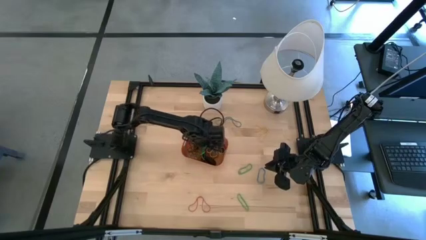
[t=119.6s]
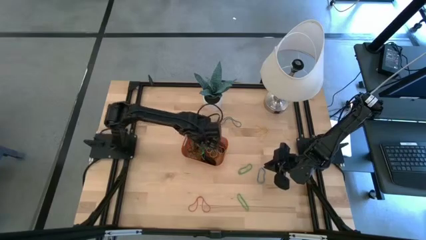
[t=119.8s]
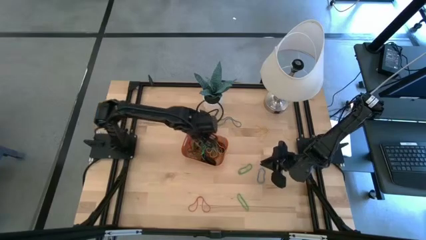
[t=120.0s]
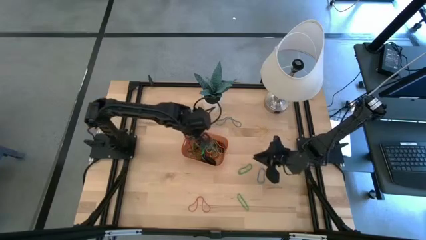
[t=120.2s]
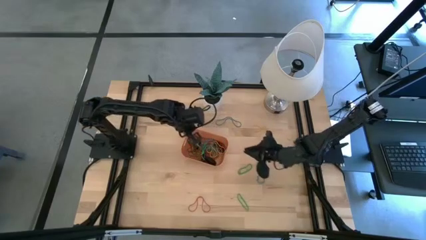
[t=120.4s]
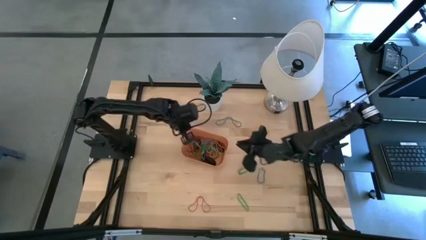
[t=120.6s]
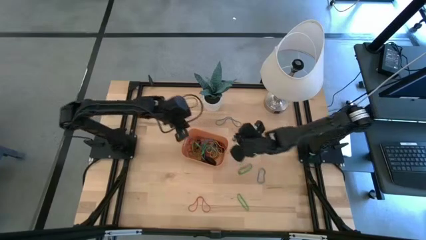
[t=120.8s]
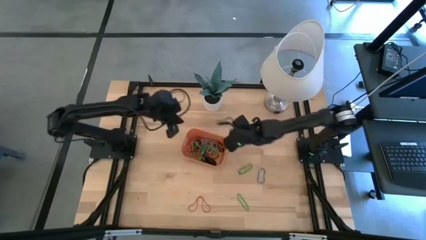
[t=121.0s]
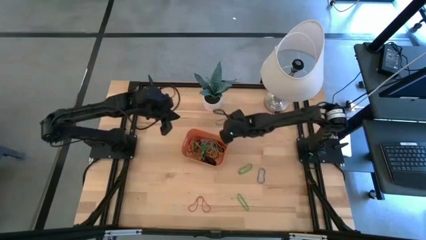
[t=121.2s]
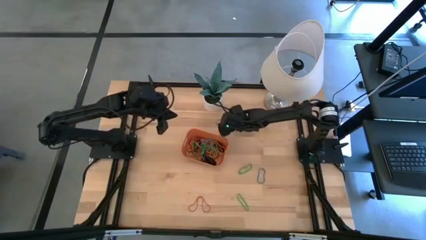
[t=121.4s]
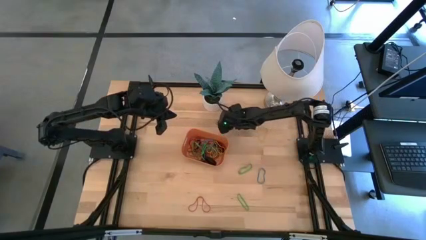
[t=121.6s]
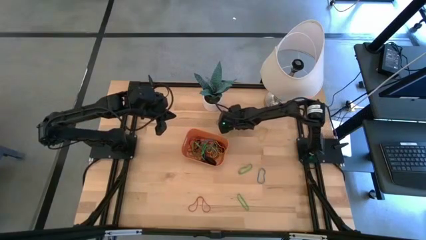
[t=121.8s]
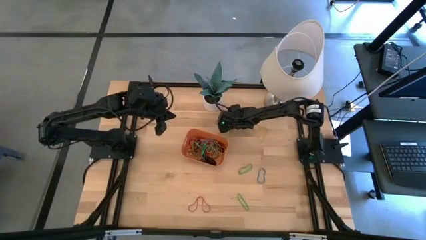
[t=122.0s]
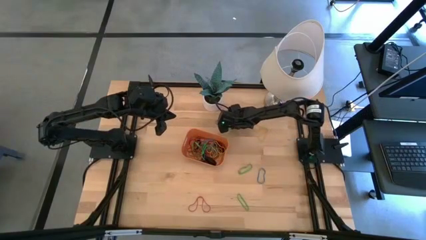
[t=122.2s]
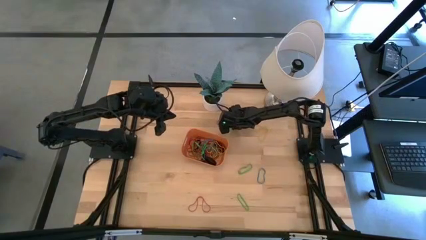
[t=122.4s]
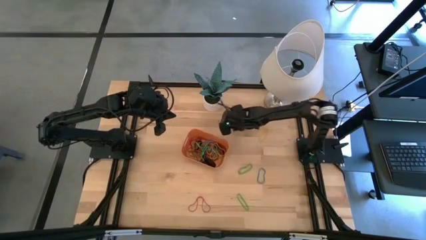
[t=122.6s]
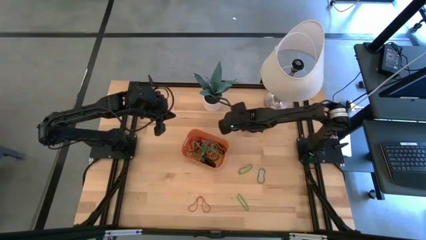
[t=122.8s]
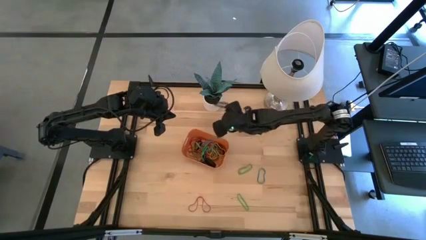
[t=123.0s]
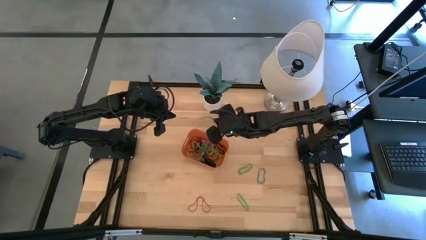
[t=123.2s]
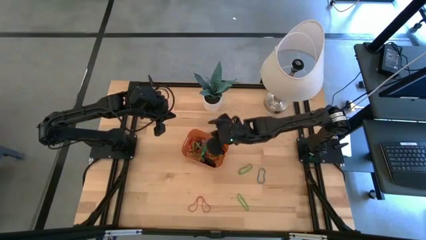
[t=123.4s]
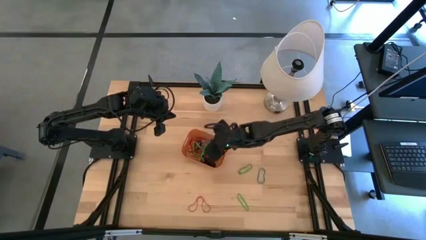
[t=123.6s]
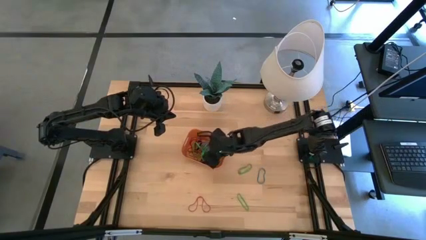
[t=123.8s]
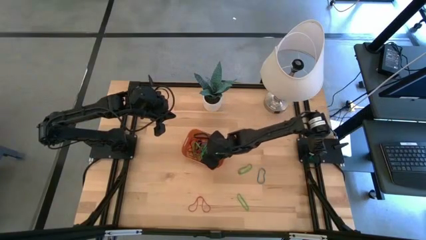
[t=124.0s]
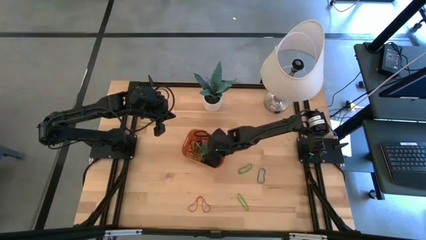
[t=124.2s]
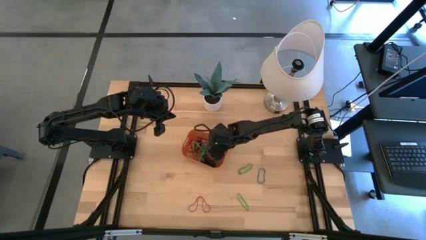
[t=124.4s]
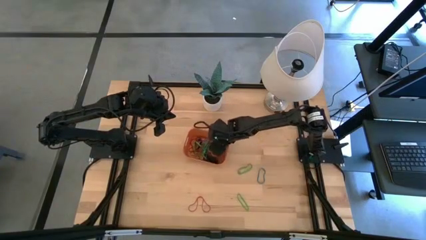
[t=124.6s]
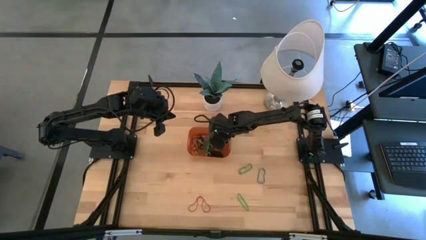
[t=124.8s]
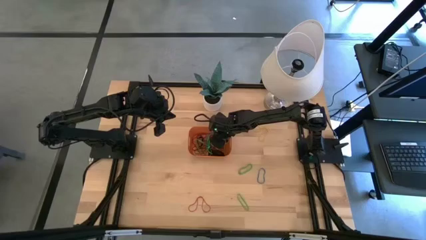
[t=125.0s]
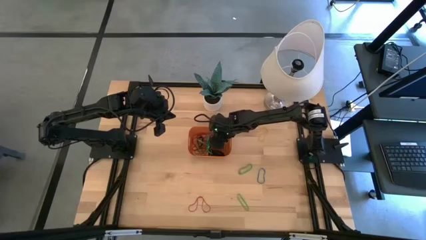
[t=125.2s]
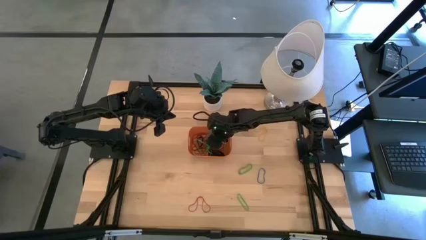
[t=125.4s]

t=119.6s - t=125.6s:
Task: Pick and place rubber bands into bin
Put the blue rubber band into the orange bin

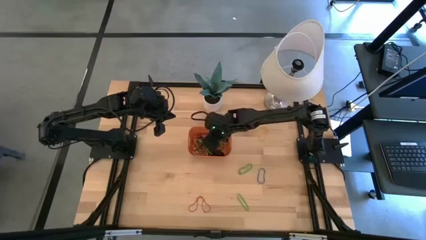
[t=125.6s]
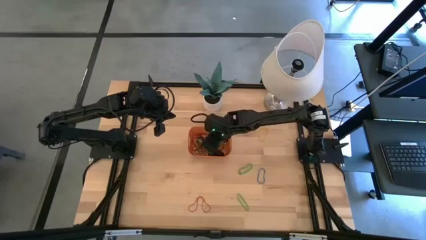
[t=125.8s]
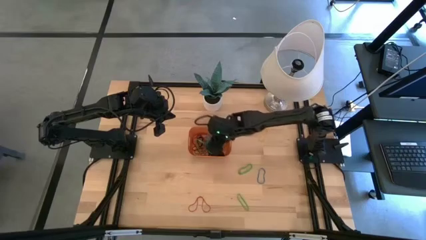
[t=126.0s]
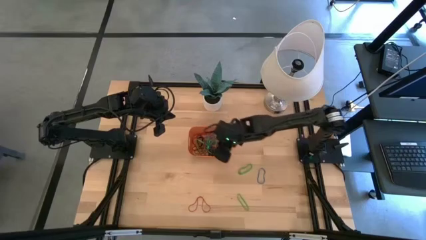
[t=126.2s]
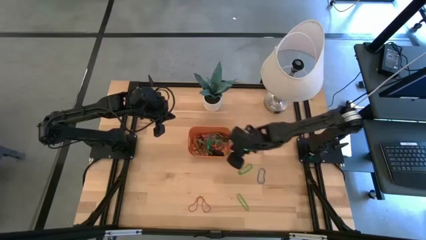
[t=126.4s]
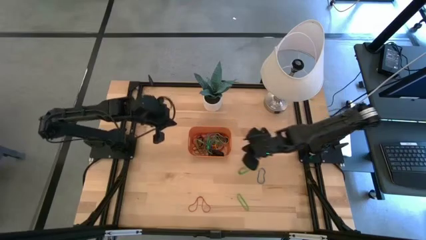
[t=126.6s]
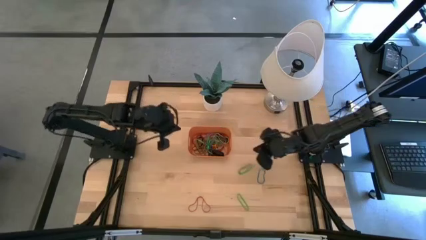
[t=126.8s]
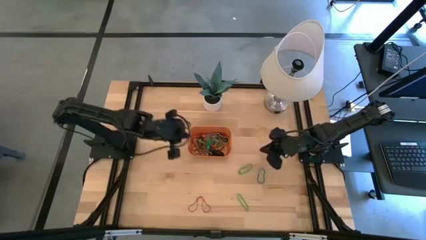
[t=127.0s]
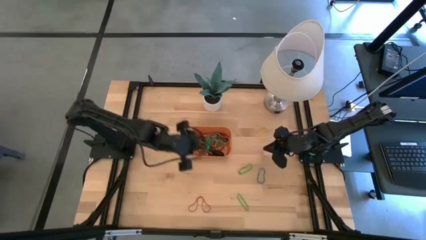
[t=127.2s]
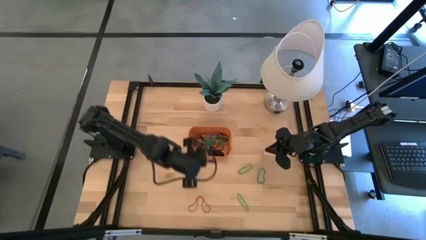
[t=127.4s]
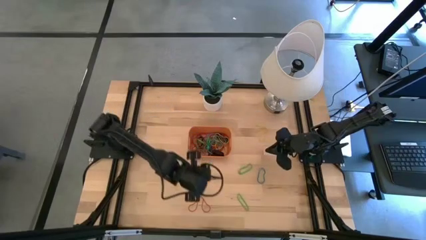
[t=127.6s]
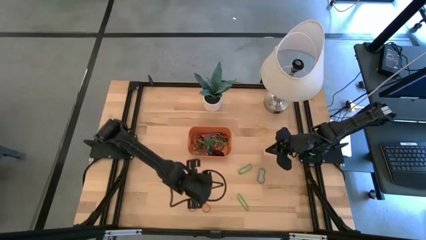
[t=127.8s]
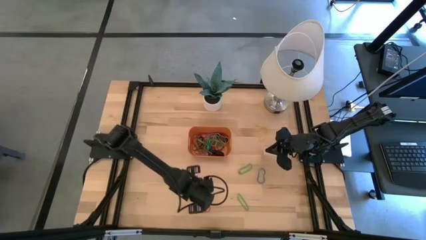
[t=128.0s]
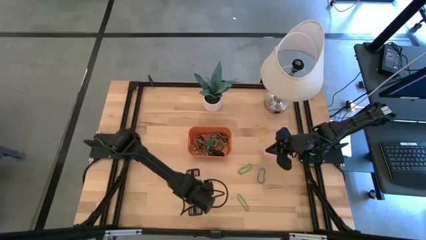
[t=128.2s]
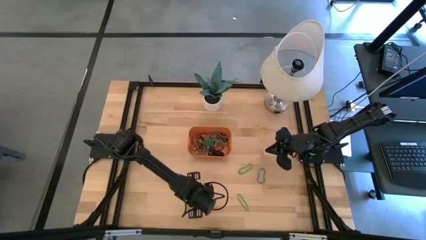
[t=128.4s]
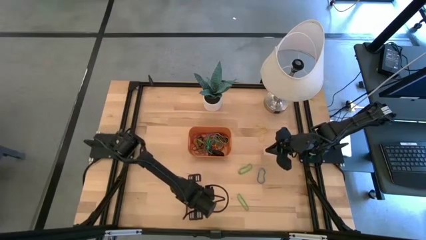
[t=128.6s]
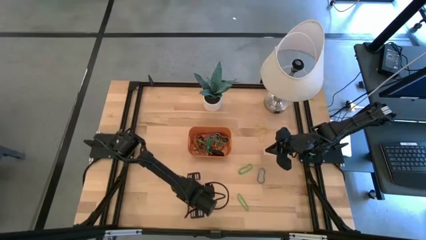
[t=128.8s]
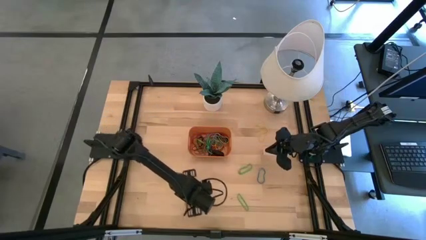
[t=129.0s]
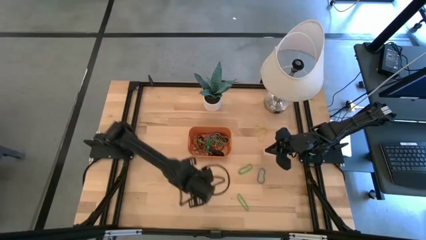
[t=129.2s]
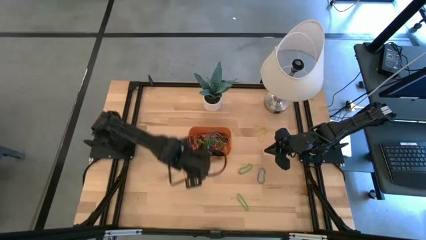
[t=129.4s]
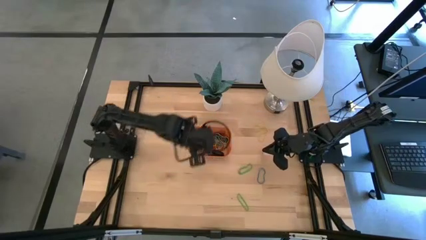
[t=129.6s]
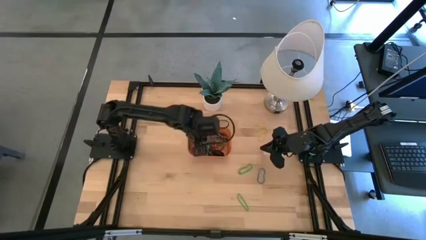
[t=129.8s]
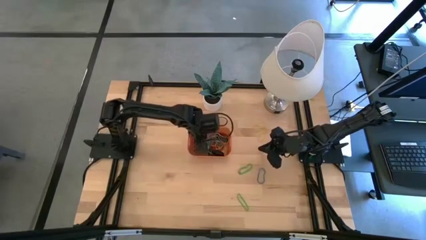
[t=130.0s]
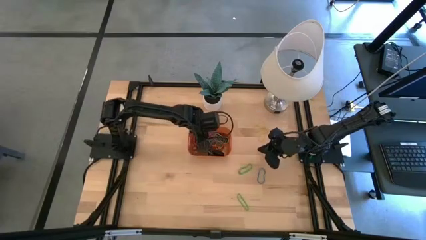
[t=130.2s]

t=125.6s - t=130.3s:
Put the red rubber band into the orange bin

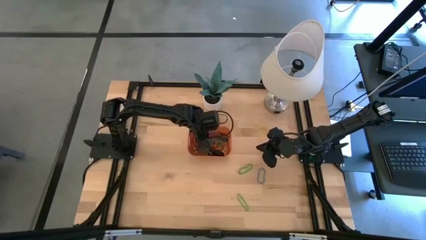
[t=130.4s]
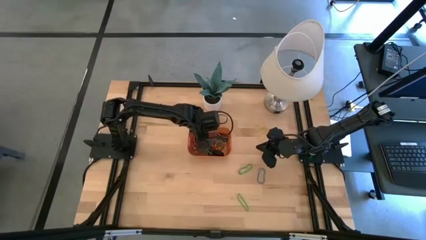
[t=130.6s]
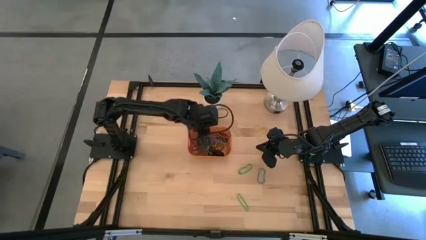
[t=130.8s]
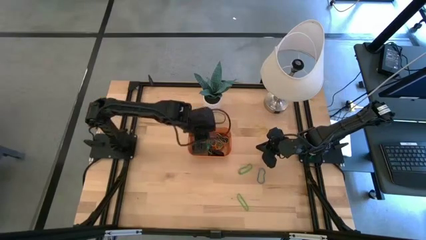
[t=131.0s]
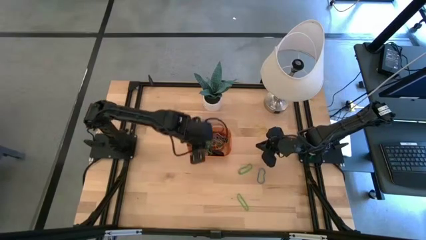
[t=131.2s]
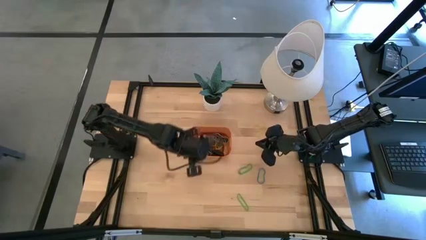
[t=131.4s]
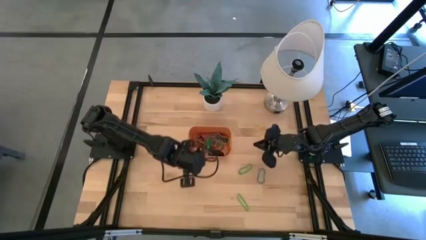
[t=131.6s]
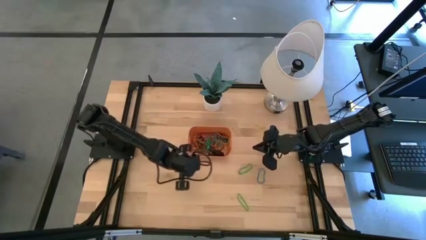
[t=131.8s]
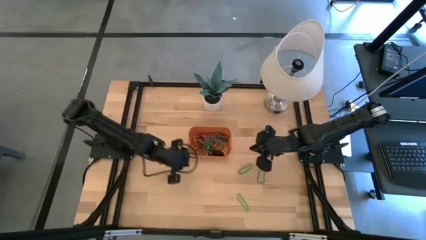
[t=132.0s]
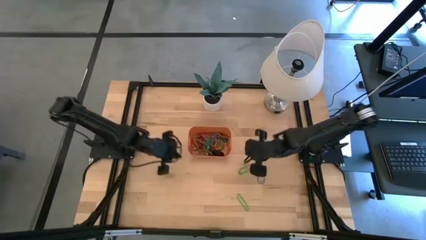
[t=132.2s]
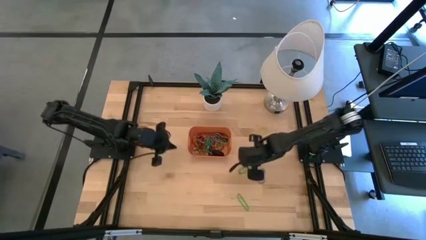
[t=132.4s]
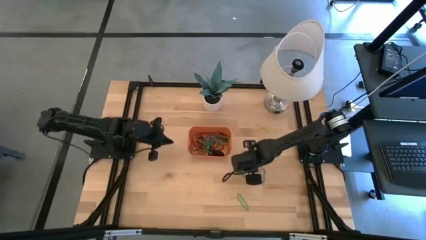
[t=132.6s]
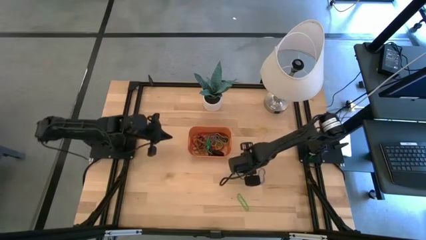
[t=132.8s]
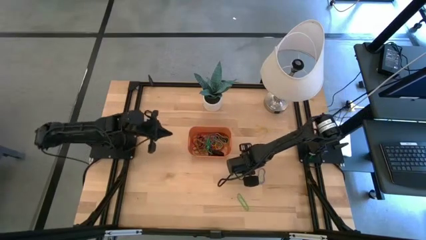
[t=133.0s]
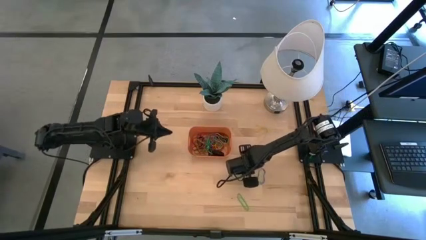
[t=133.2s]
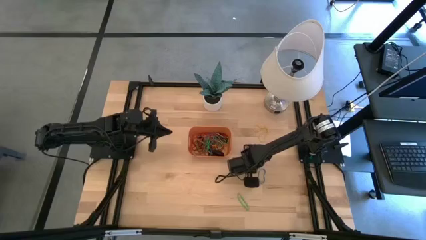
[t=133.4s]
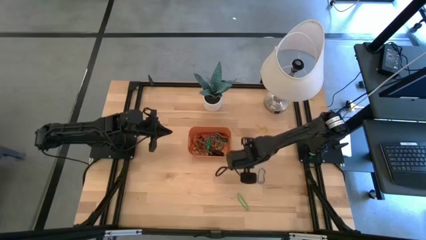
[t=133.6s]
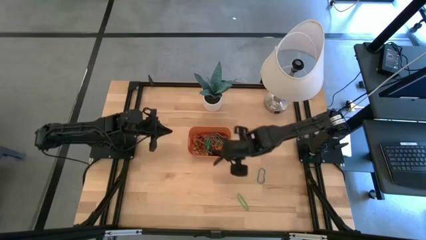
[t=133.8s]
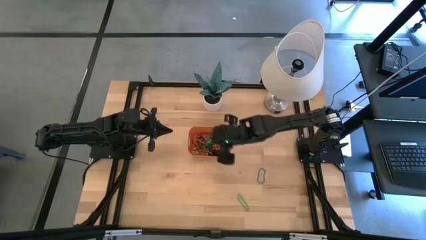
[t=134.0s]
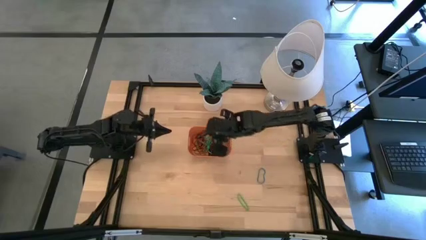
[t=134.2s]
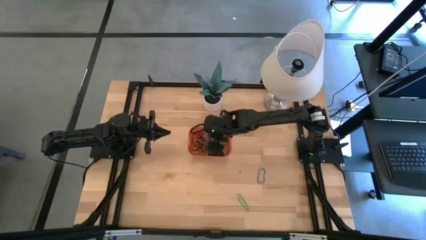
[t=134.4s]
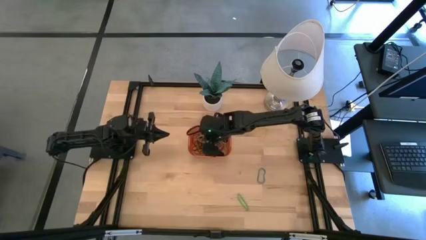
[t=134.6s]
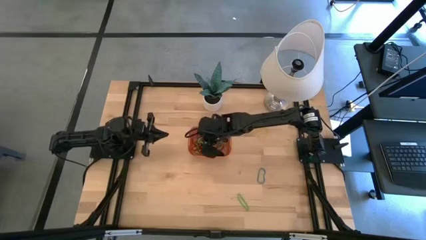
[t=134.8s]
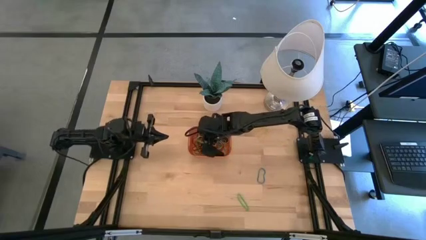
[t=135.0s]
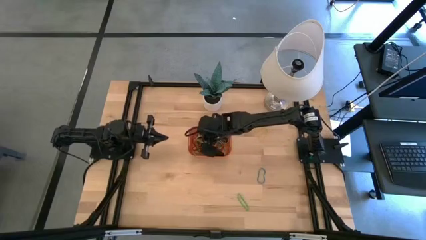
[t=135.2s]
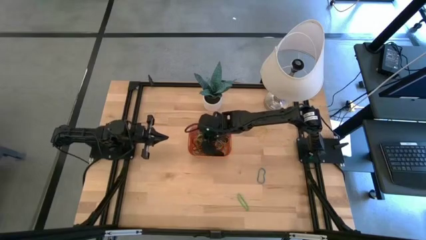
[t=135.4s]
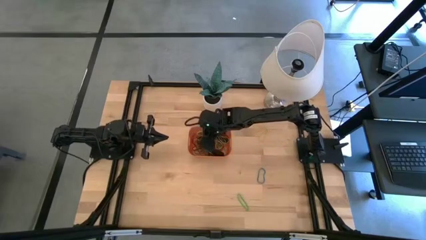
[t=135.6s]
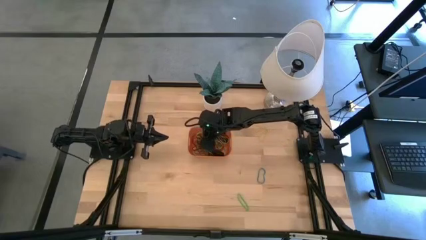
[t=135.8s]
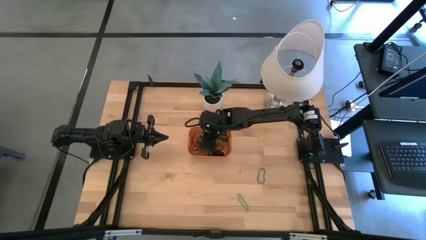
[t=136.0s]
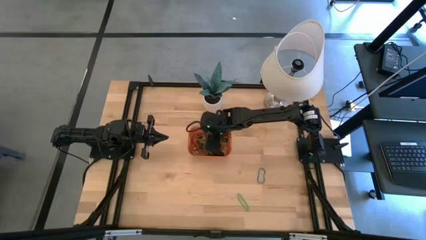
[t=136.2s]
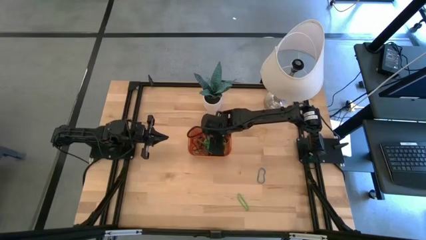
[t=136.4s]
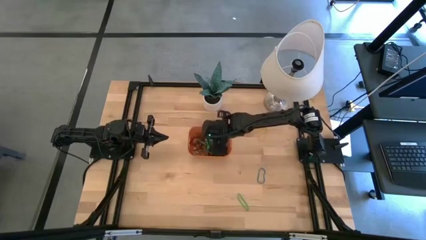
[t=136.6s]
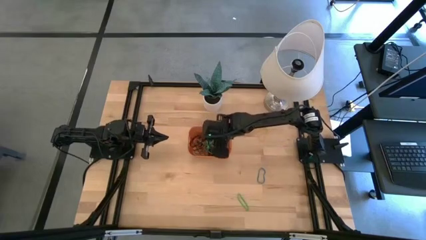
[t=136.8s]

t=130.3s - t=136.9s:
Put the green rubber band into the orange bin
